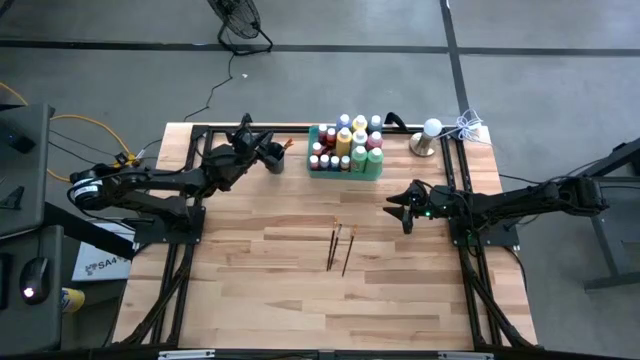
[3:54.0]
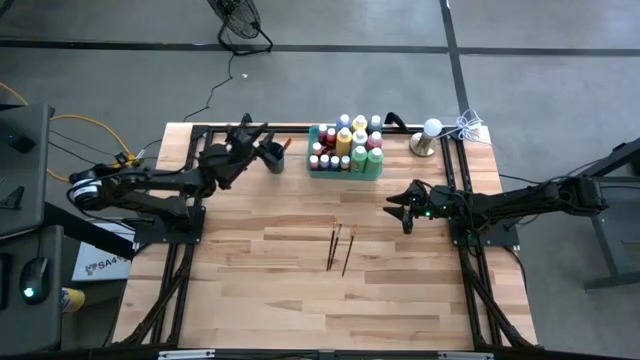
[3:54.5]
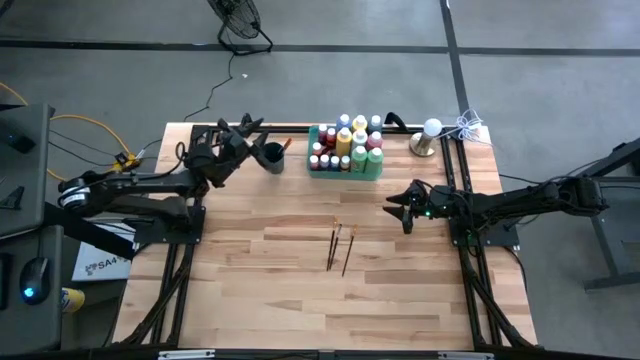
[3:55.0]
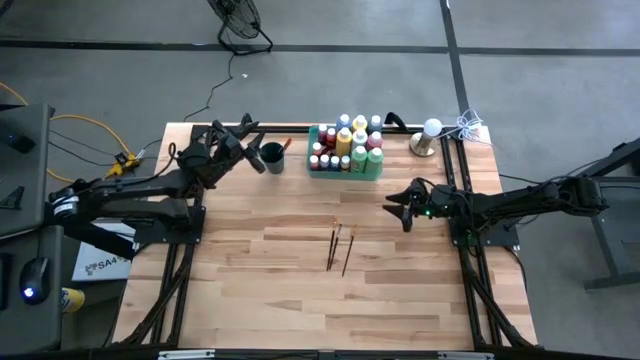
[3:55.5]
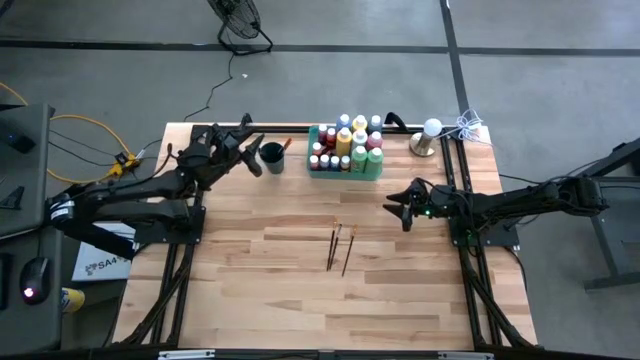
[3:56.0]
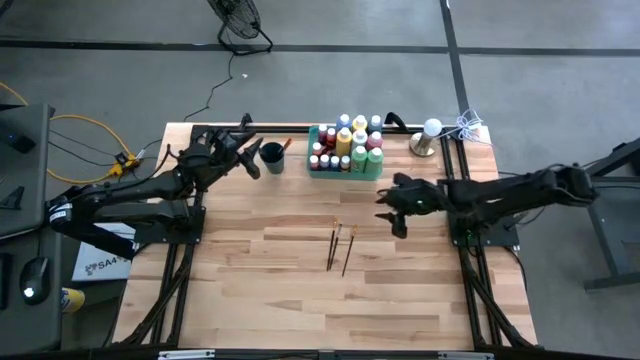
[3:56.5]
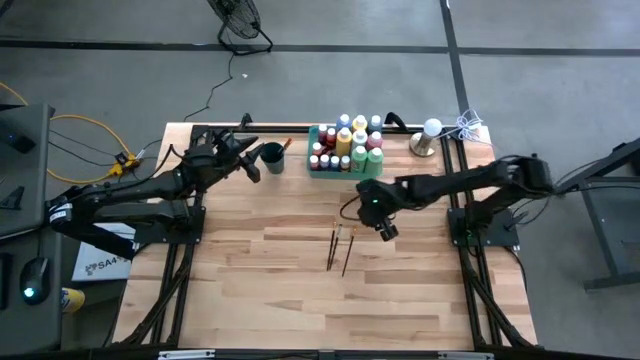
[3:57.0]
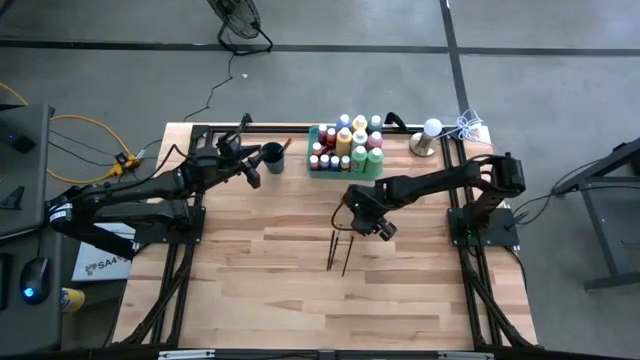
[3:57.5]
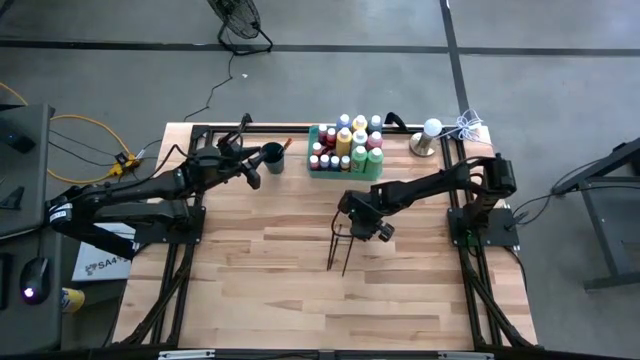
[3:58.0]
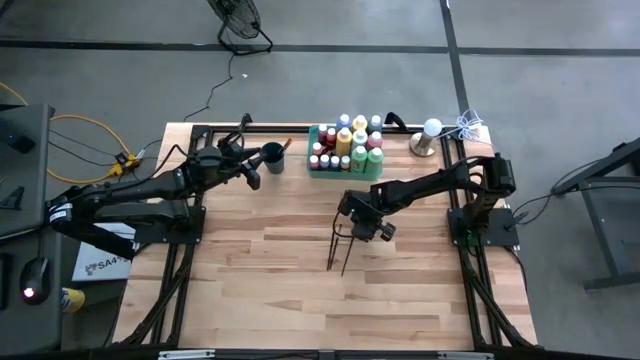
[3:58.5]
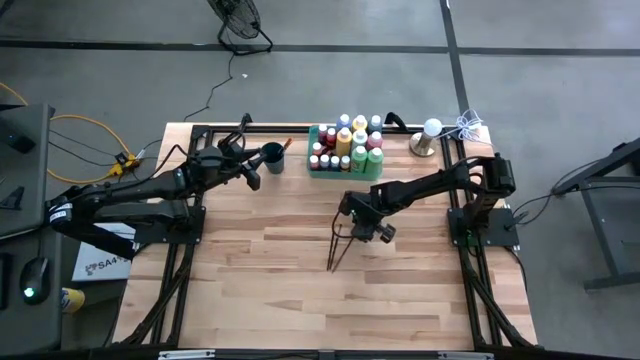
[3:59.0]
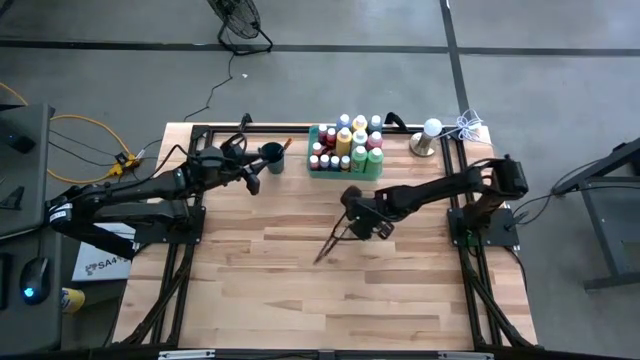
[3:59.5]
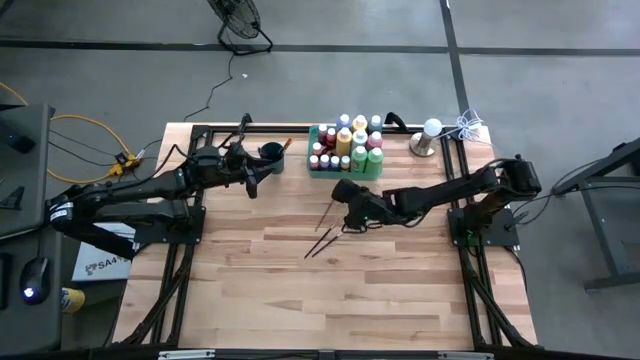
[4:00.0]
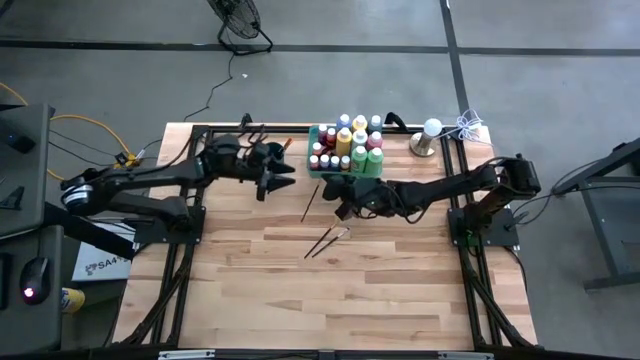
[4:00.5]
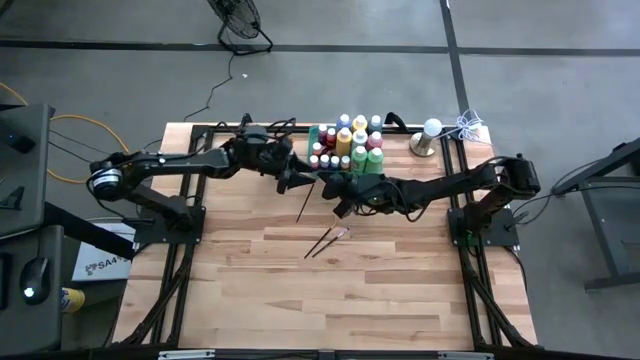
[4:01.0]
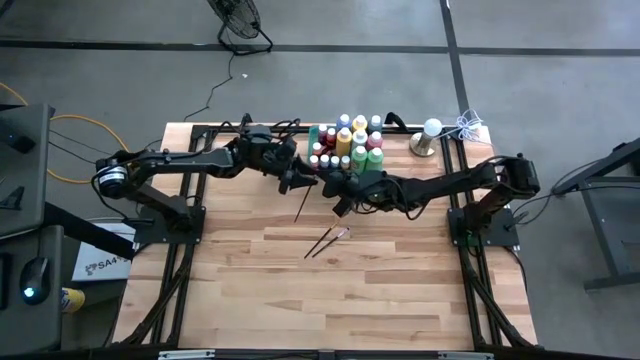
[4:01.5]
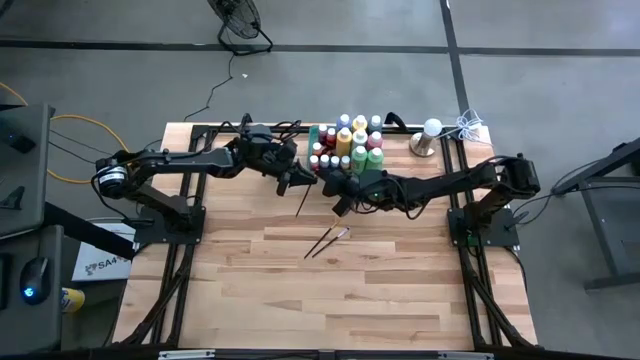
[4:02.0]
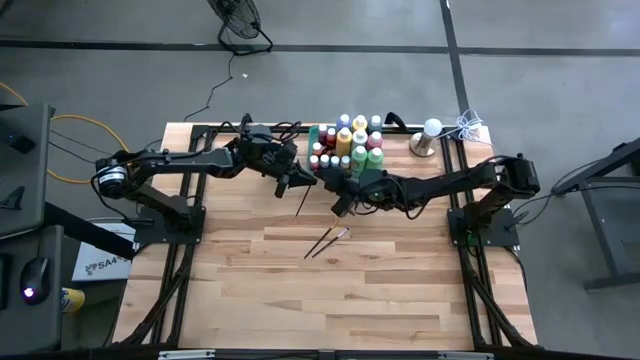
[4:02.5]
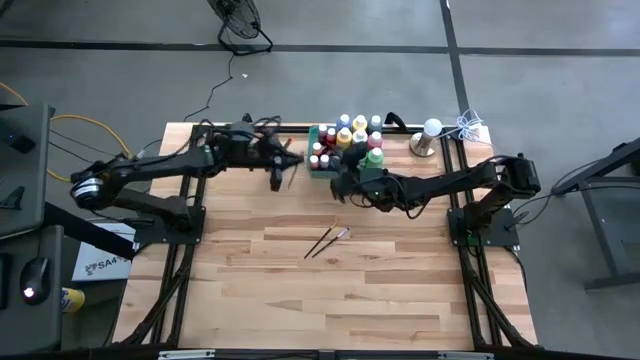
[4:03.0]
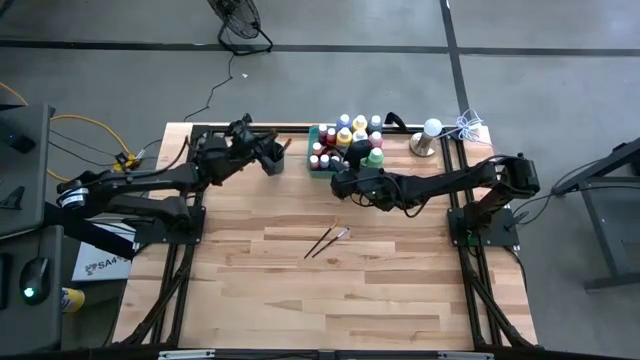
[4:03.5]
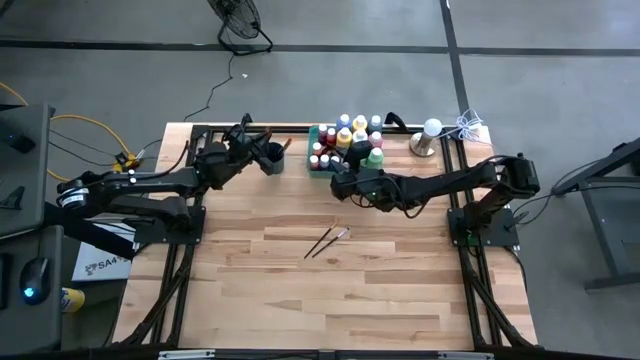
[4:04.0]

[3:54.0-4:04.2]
Task: Pick & Place Paint Supplies
Put the gold black paint brush into the blue cup

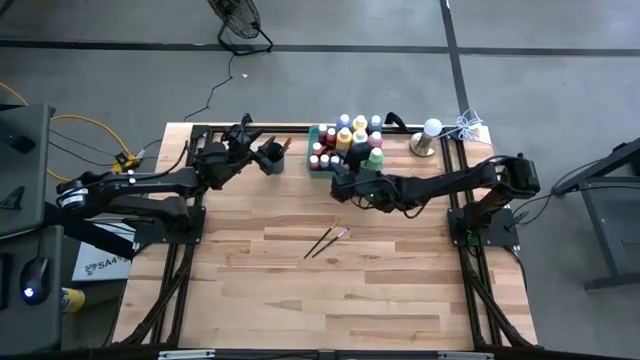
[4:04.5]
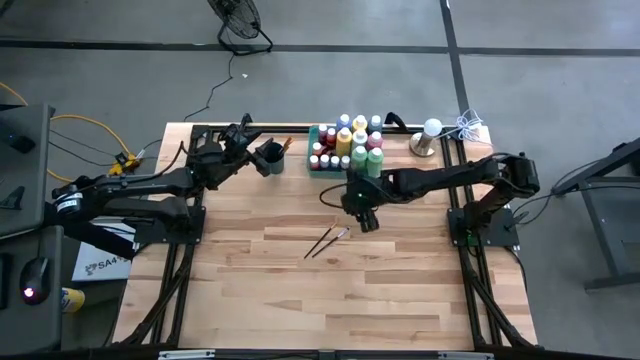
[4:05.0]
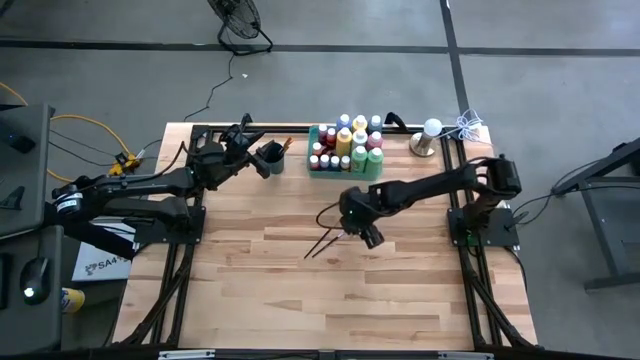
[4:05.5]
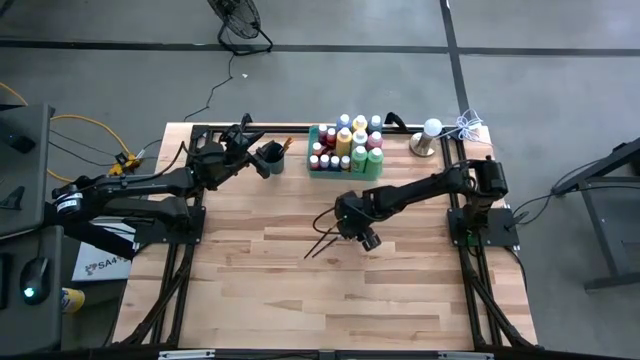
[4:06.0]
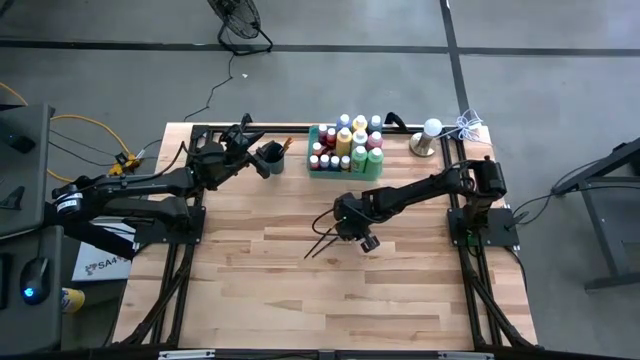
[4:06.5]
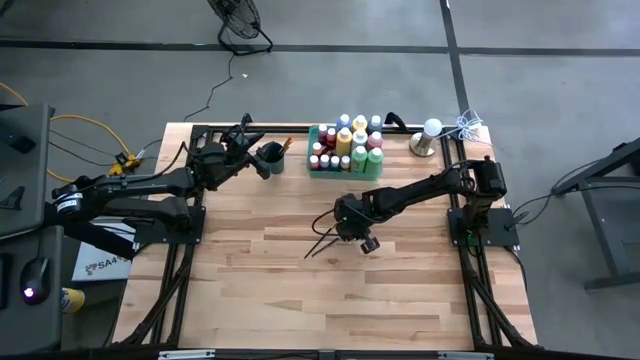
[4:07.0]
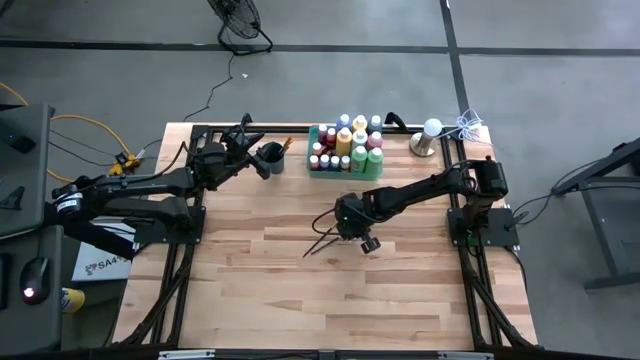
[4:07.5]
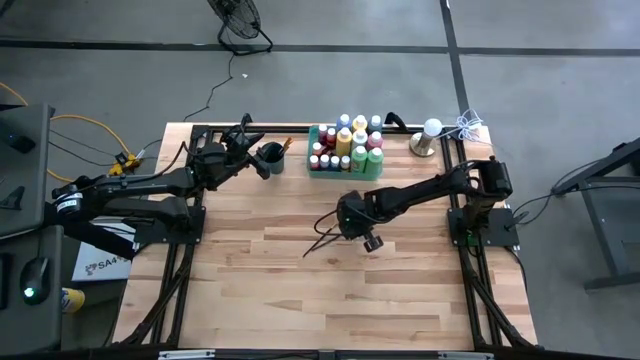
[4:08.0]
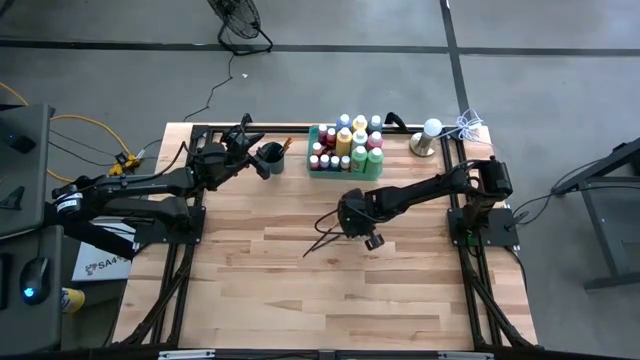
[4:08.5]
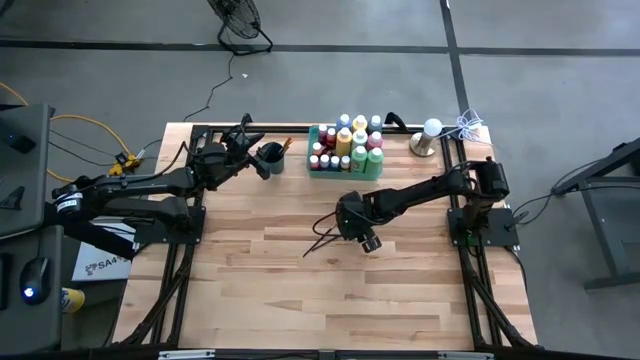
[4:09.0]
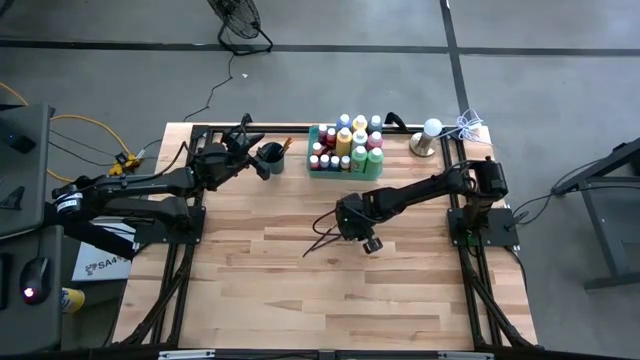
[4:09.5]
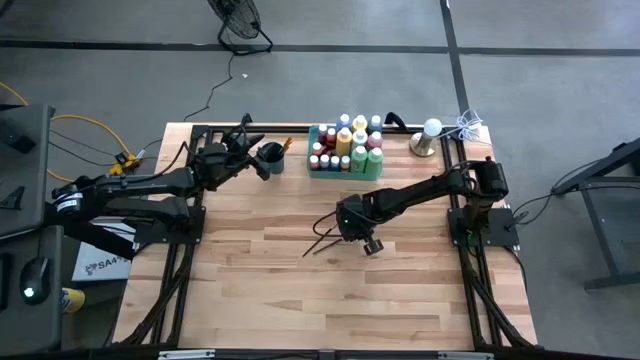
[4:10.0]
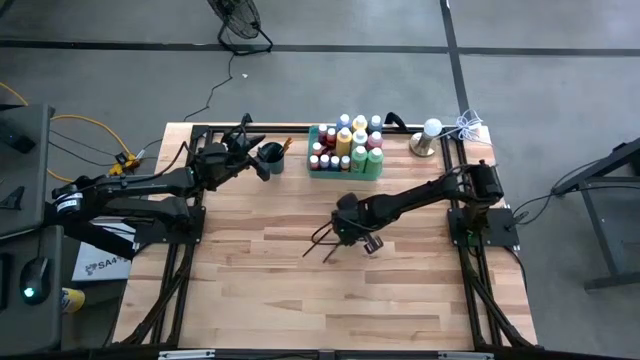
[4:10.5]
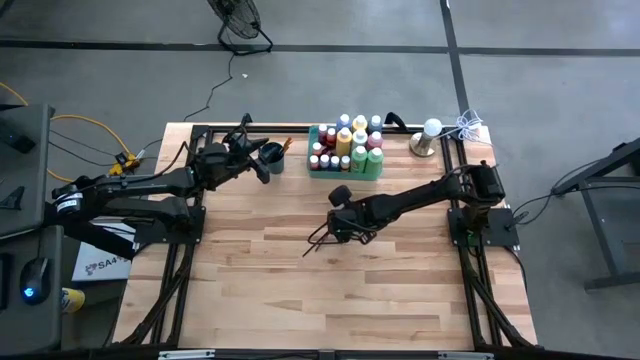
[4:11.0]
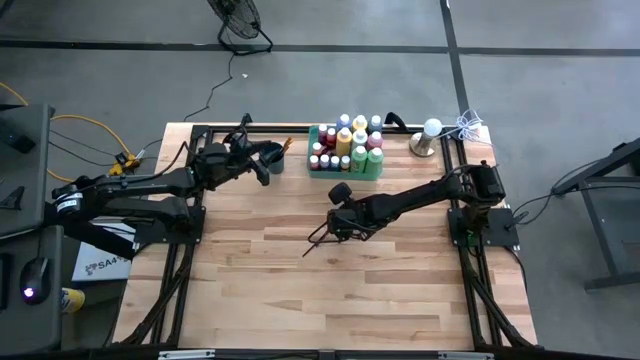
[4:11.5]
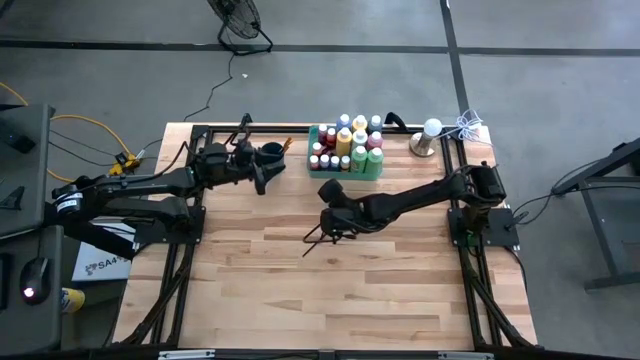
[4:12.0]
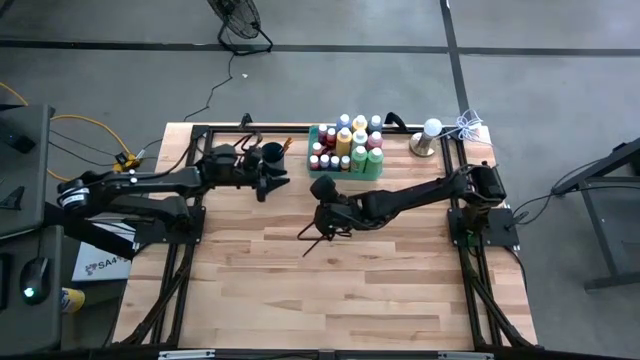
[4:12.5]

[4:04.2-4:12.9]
Put the silver black paint brush into the blue cup

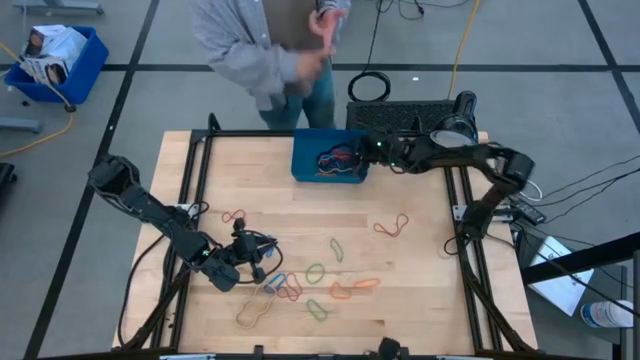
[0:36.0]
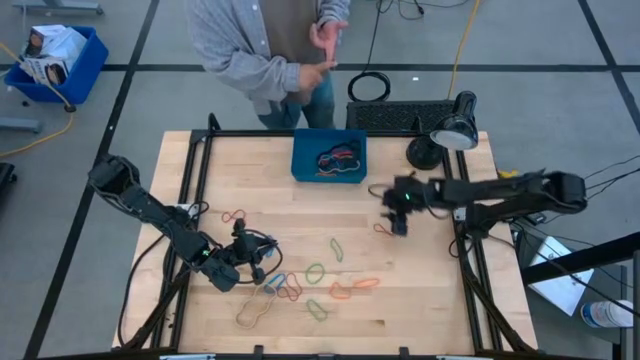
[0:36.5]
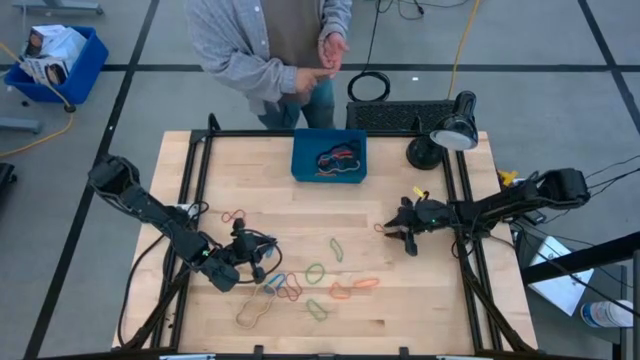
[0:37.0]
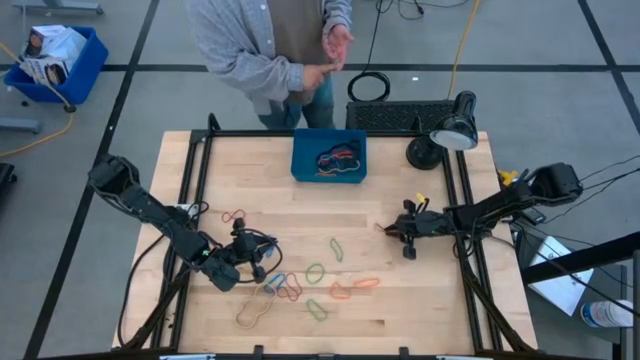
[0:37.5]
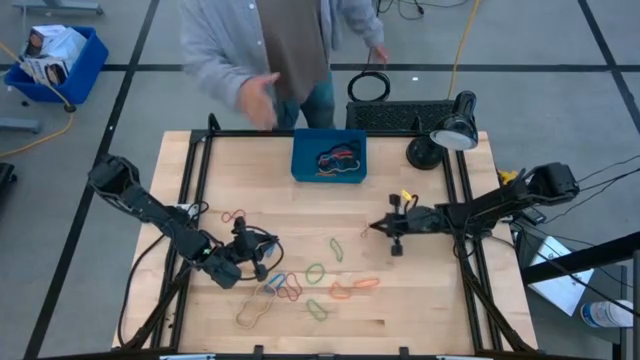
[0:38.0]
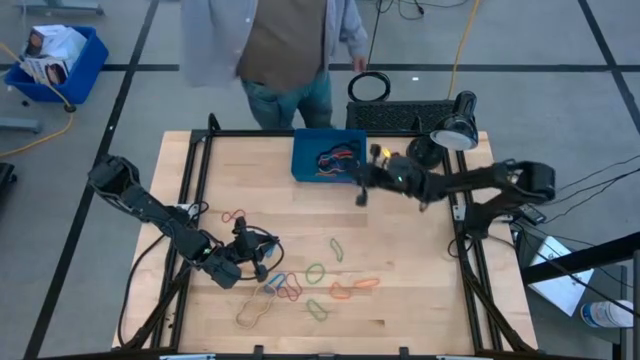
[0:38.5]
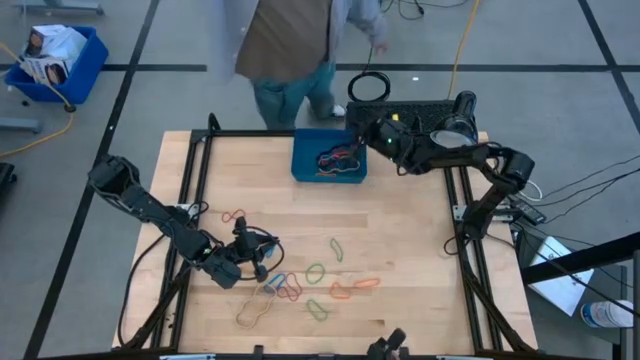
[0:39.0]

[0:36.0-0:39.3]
Task: Pick and place rubber bands into bin
Put the red rubber band into the blue bin
